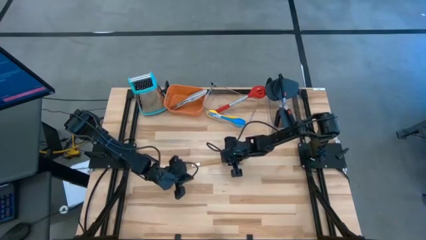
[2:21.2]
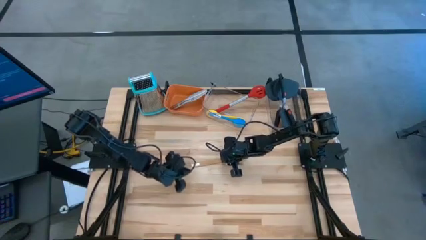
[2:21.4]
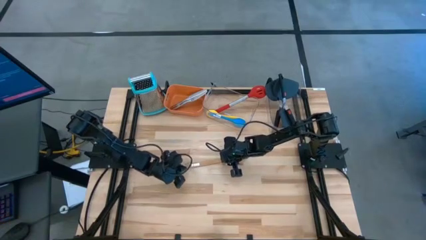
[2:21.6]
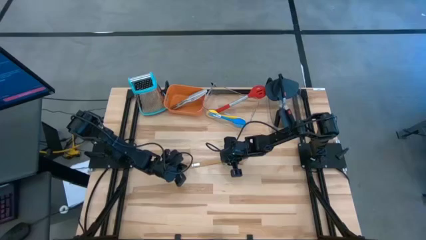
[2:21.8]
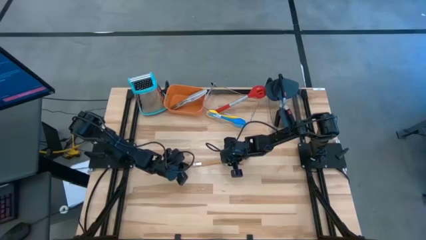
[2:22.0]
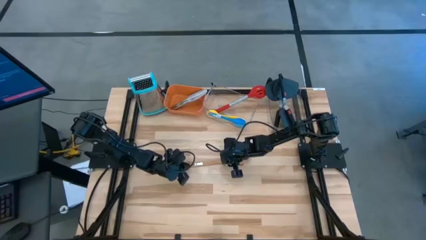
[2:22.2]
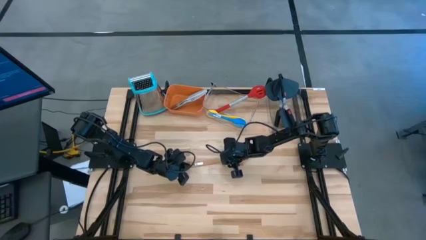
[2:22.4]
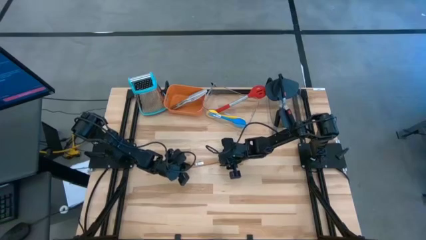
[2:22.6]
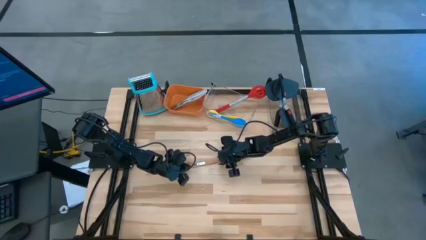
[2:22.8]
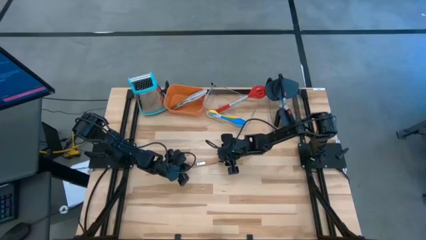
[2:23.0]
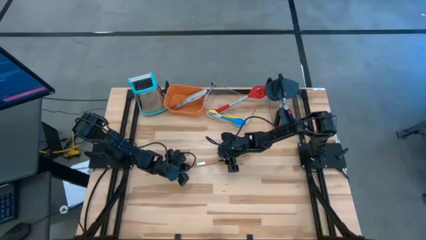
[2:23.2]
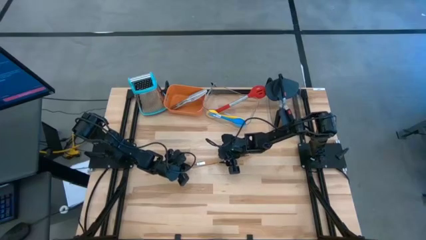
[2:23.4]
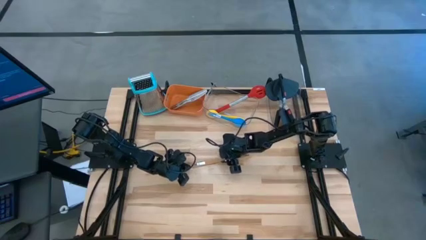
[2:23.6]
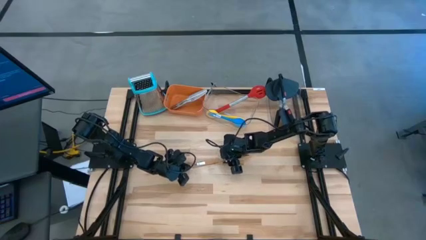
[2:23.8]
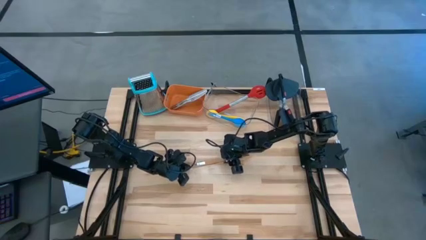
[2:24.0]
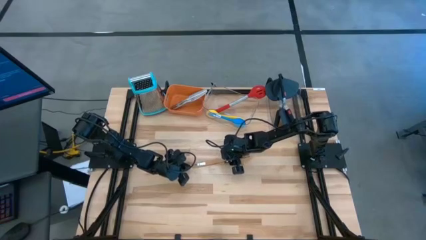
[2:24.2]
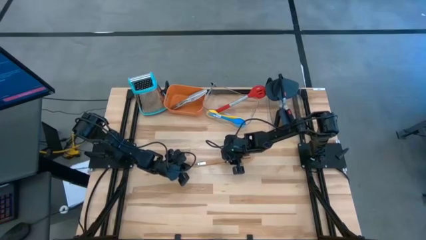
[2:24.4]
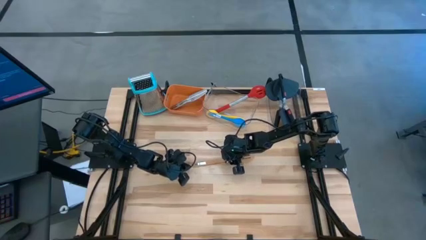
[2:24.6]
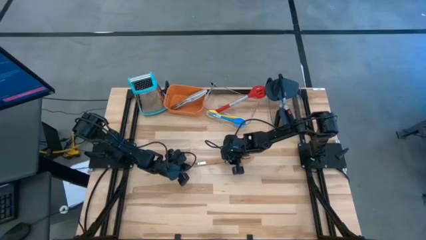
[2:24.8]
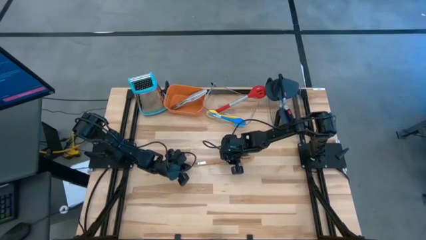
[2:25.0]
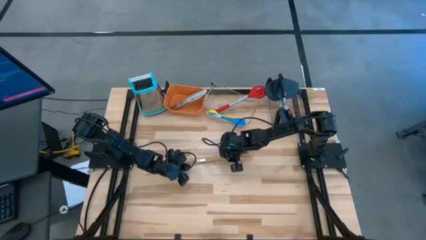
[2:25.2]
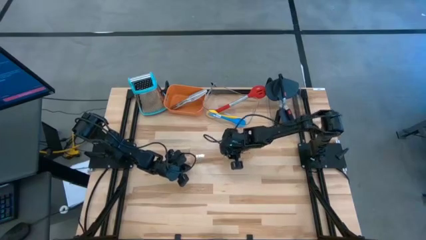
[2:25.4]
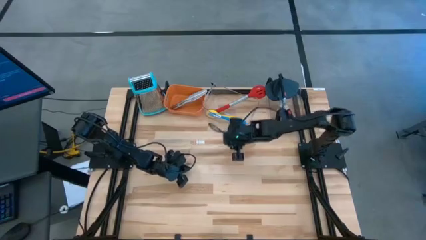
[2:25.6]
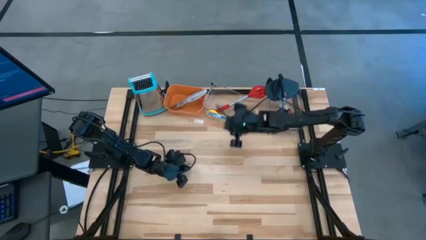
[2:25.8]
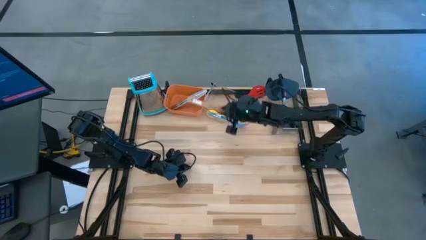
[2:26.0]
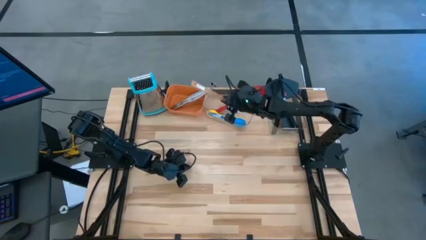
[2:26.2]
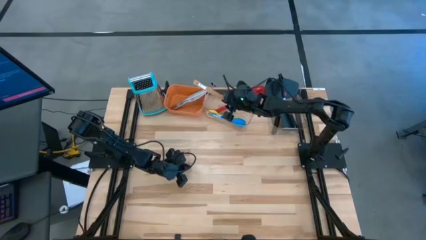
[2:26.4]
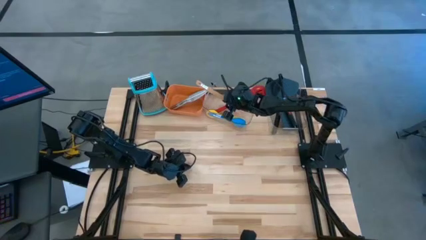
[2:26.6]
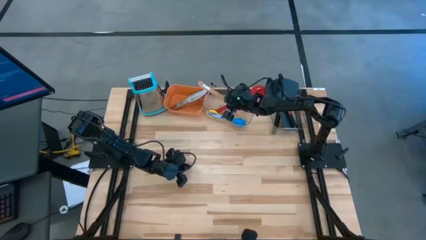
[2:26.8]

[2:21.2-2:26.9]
Task: Pick & Place Kitchen Items
Put the brown serving spoon into the left transparent bin

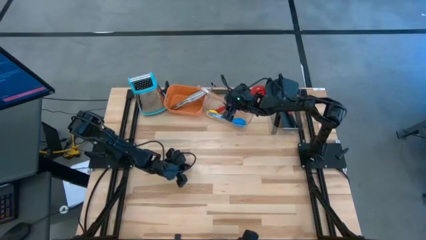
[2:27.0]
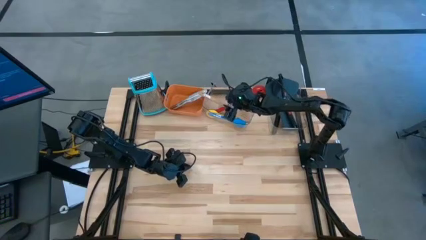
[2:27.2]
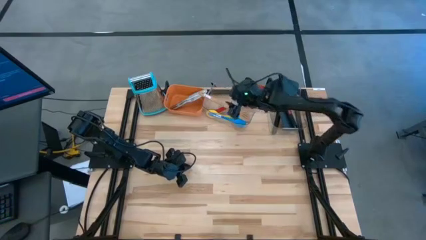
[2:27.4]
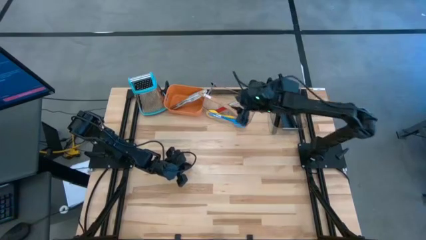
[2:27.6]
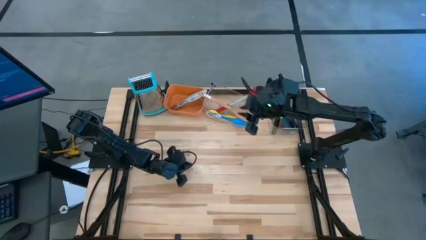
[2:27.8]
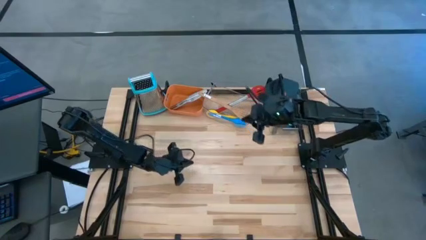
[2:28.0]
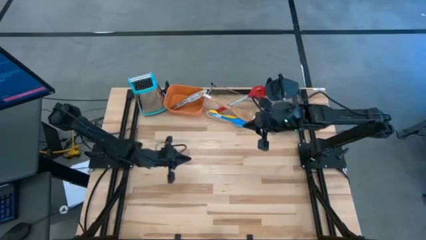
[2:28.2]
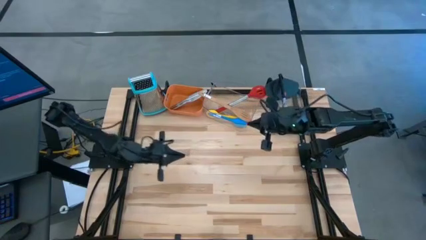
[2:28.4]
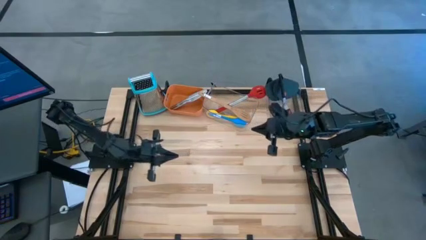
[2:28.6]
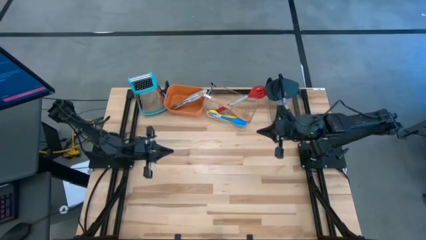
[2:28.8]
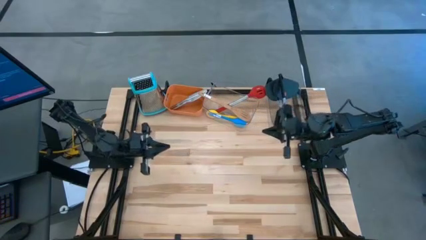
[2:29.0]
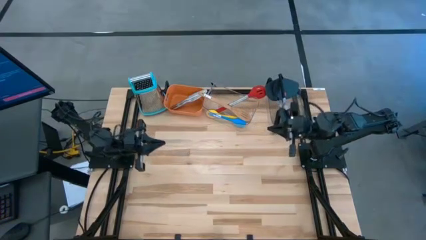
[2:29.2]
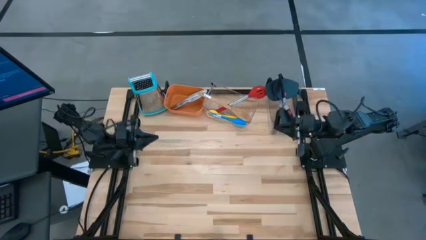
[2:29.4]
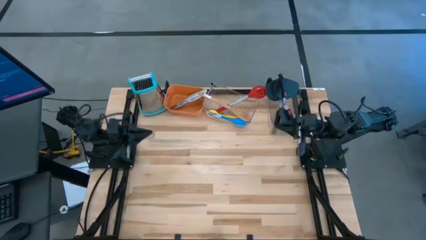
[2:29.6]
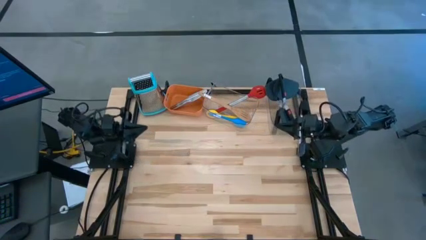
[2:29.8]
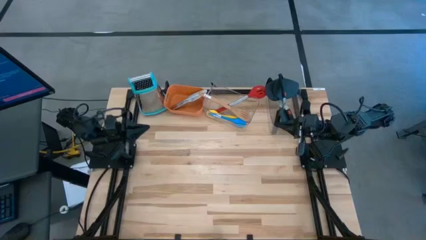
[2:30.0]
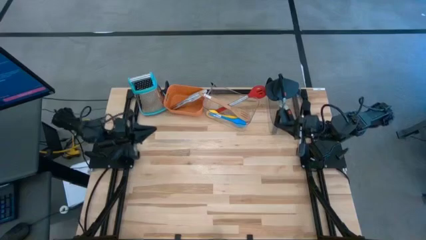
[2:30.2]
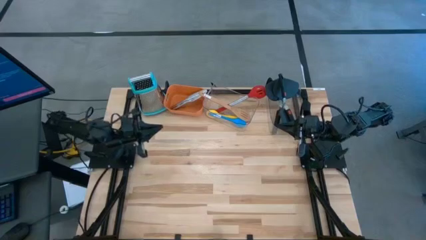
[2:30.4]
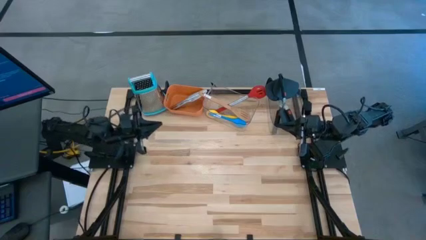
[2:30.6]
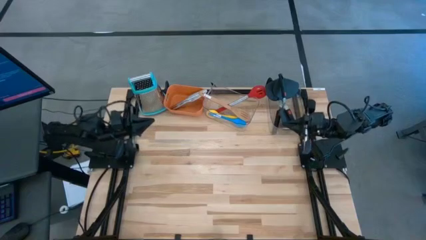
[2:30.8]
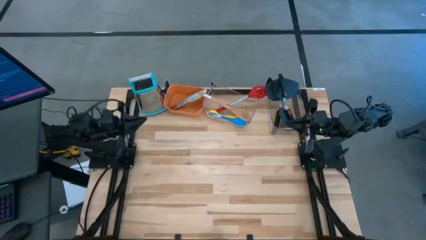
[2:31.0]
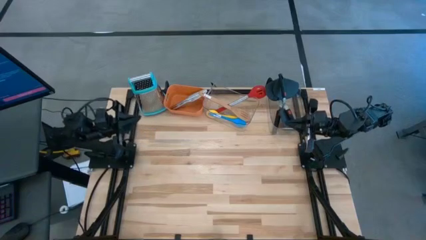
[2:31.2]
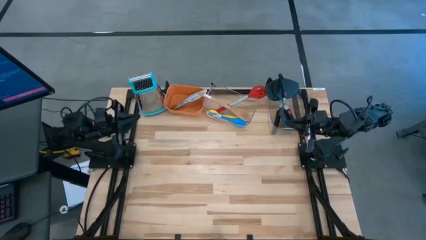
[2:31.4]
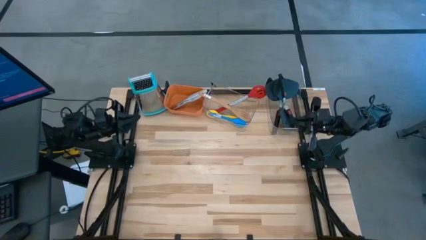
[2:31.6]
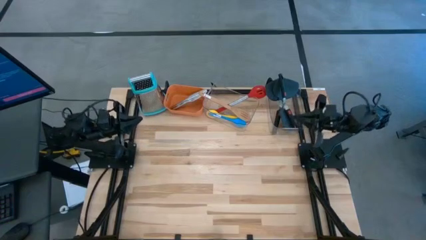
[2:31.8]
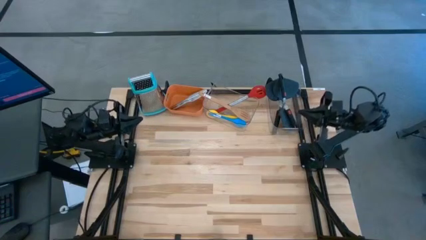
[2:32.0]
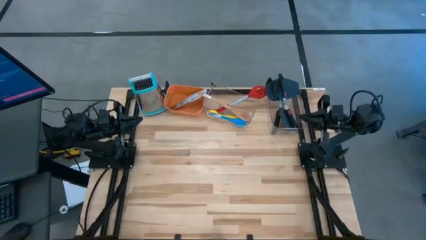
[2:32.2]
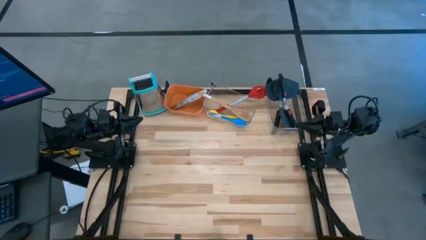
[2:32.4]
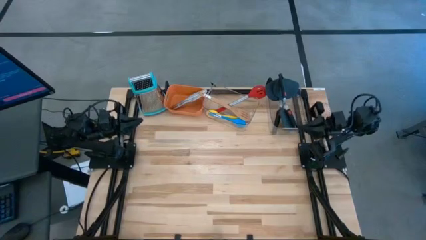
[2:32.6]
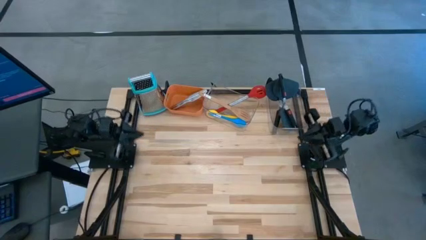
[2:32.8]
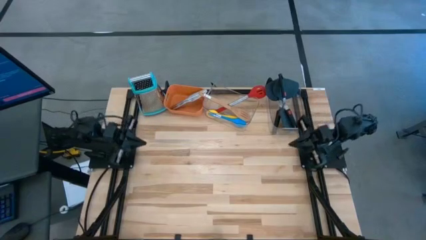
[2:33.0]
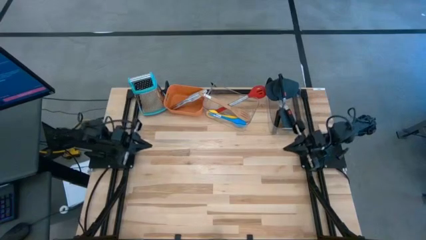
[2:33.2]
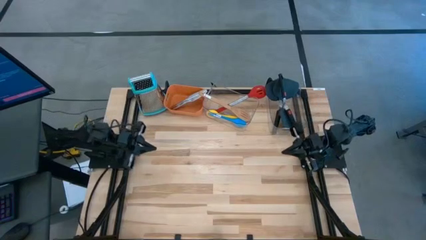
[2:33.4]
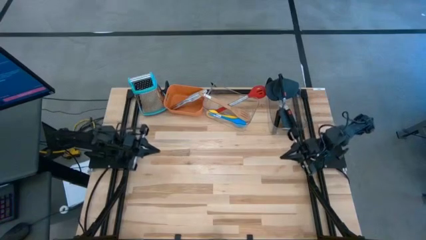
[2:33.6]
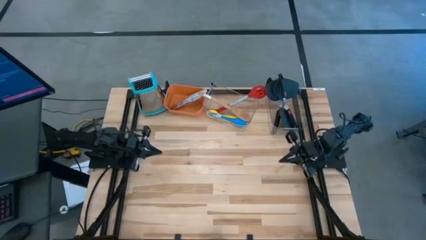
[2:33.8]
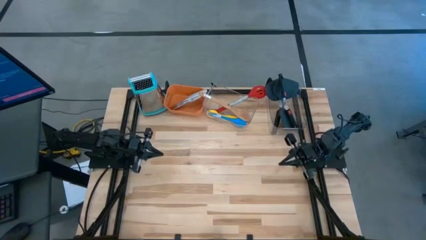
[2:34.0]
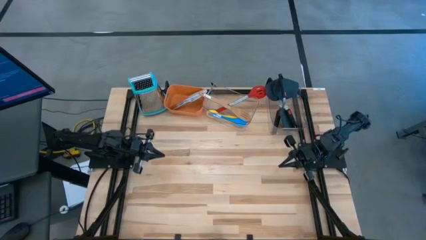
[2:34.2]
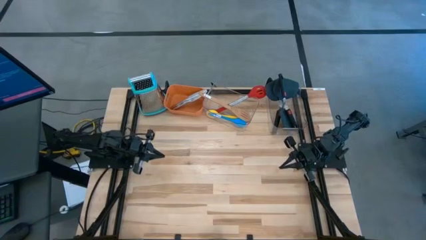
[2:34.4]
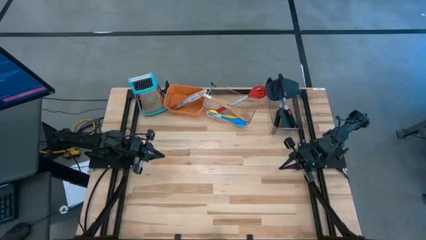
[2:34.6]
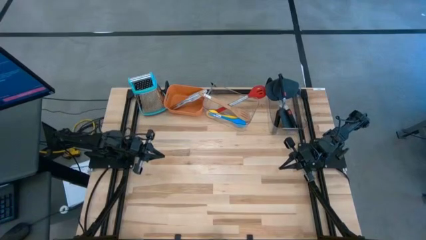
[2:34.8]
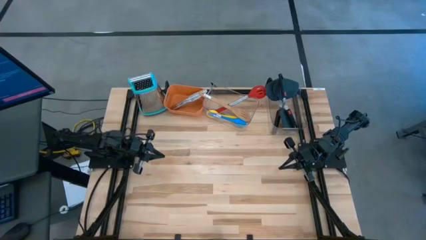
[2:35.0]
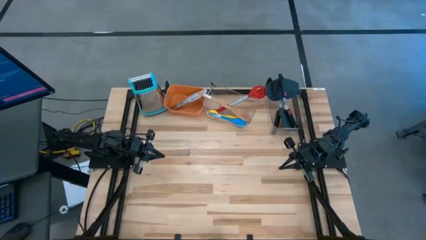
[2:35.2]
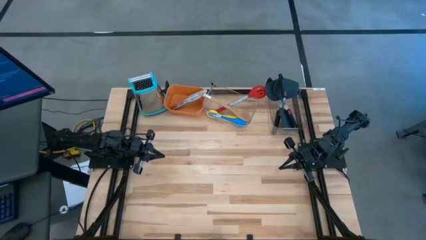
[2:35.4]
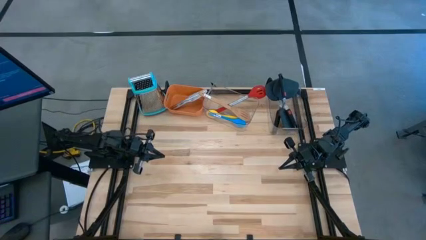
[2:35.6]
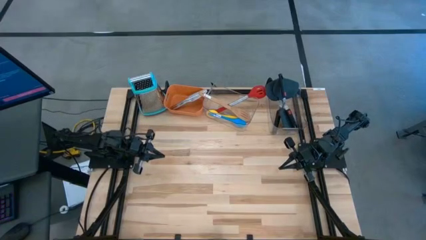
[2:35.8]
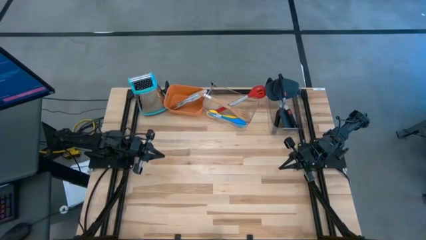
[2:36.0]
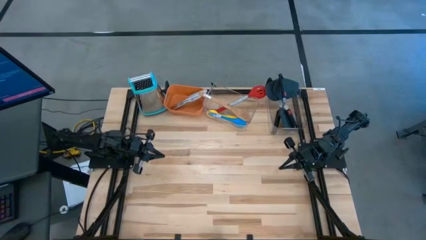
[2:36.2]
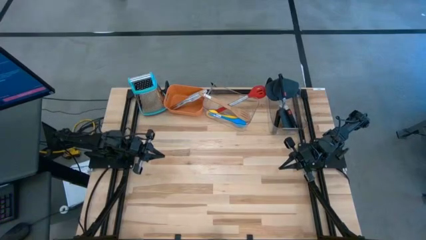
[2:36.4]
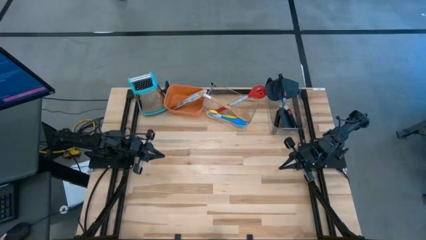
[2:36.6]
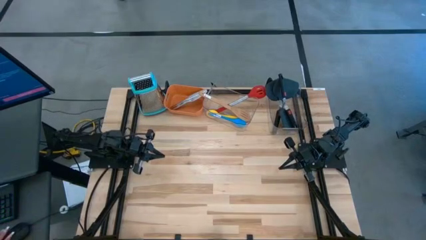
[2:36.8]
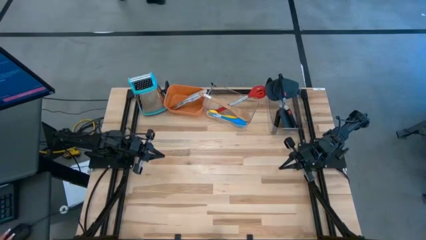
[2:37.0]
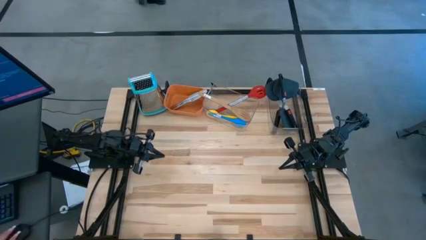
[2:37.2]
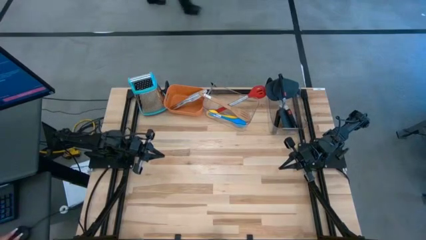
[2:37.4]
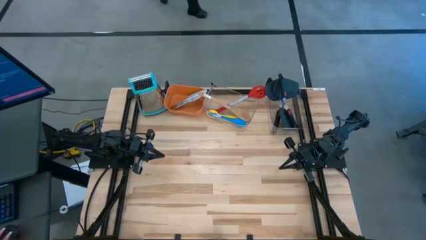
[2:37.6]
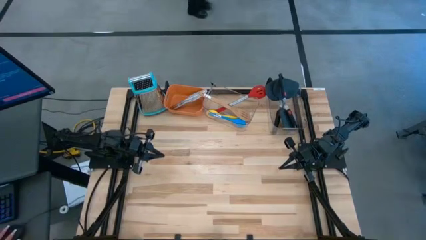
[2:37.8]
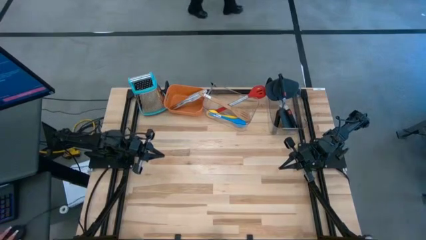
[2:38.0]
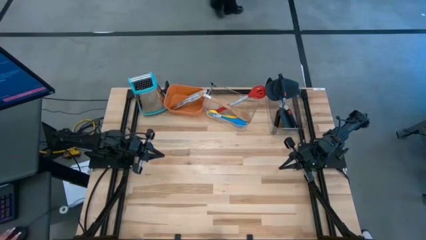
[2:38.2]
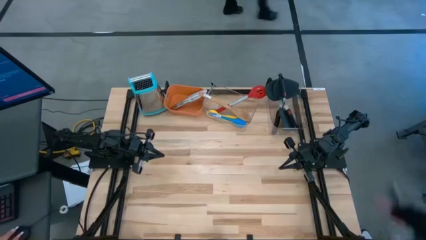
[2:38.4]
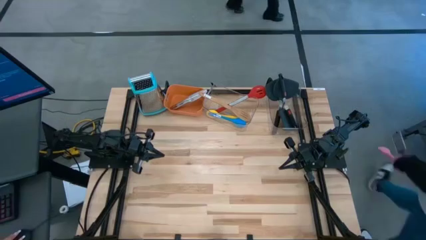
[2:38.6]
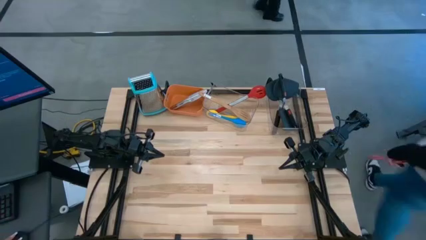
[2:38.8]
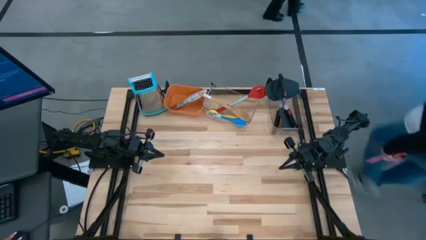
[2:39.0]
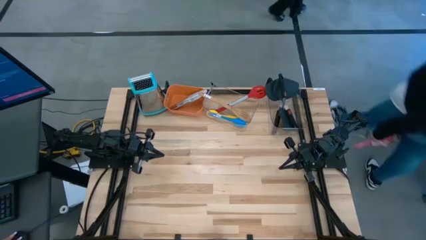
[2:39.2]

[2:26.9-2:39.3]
Return to Home Position
